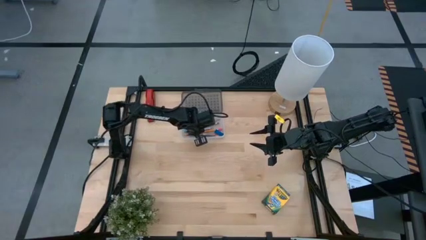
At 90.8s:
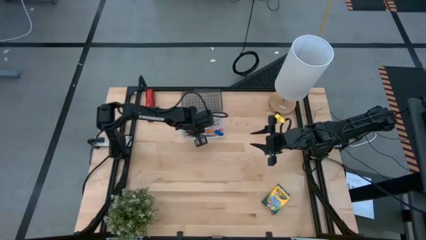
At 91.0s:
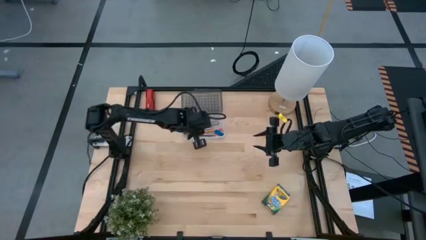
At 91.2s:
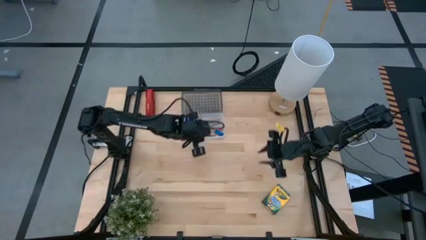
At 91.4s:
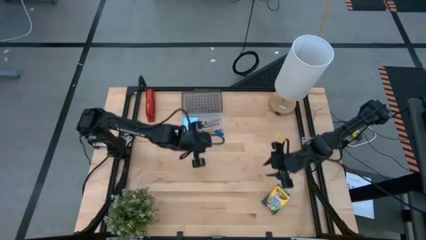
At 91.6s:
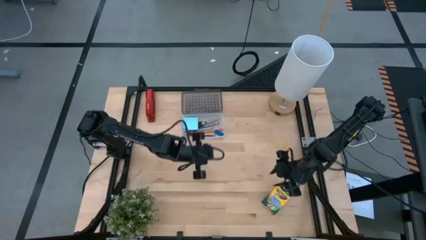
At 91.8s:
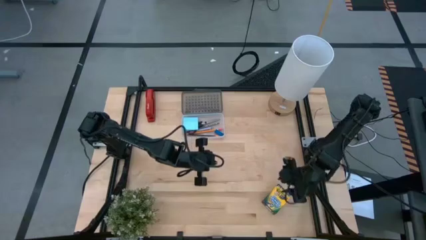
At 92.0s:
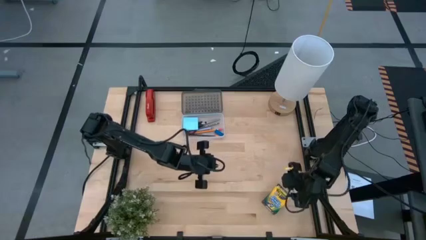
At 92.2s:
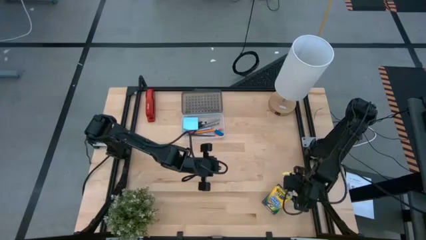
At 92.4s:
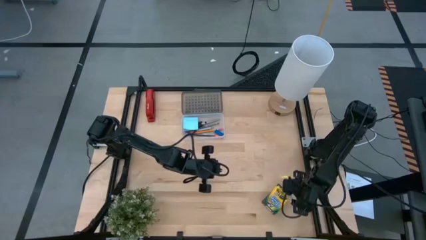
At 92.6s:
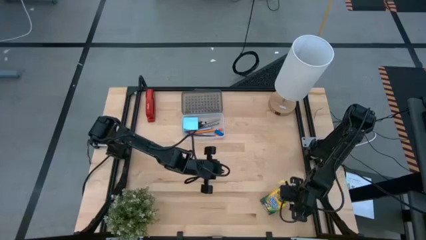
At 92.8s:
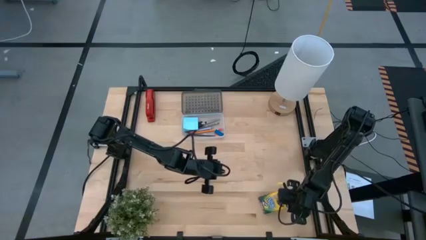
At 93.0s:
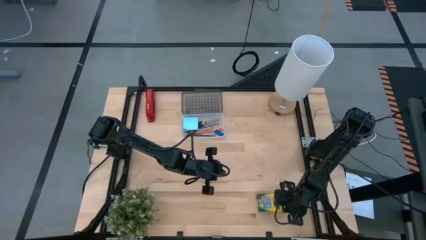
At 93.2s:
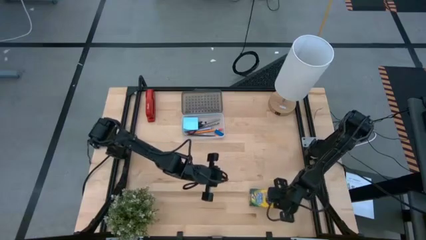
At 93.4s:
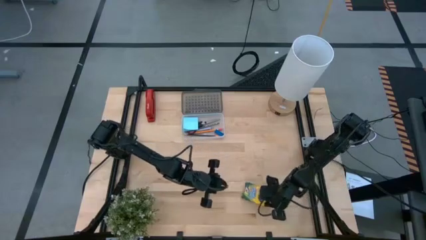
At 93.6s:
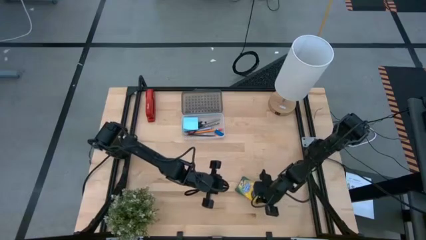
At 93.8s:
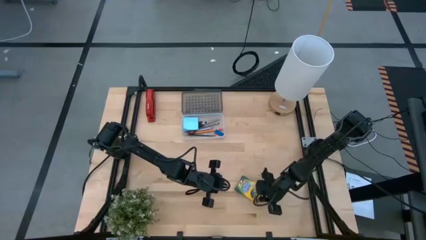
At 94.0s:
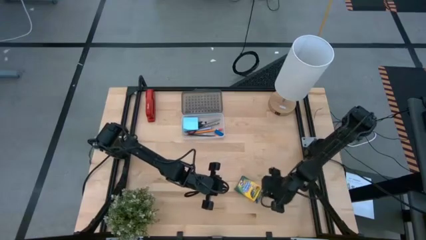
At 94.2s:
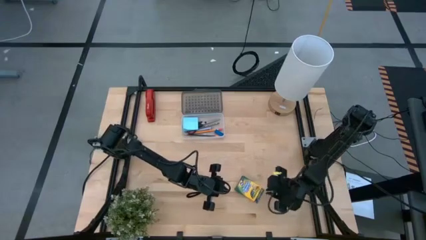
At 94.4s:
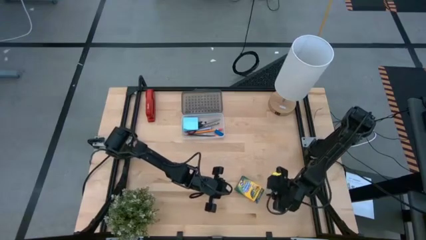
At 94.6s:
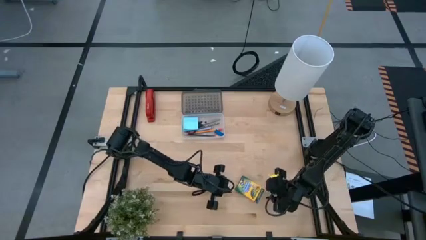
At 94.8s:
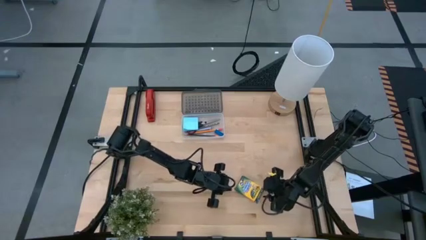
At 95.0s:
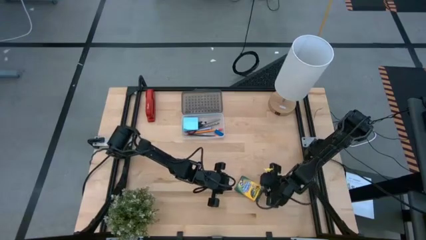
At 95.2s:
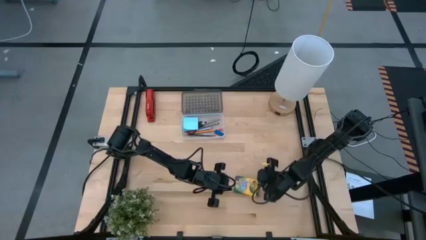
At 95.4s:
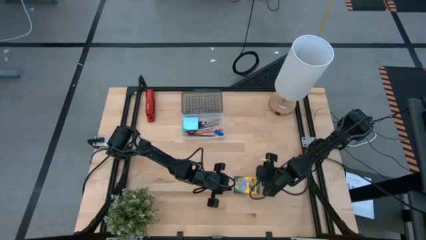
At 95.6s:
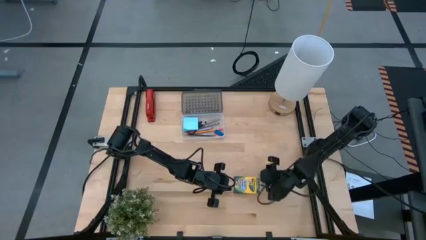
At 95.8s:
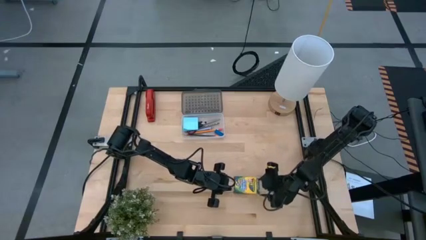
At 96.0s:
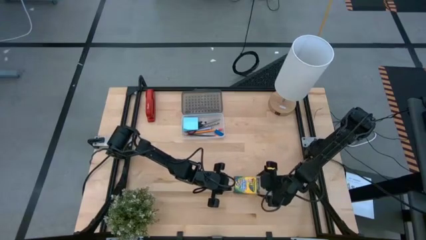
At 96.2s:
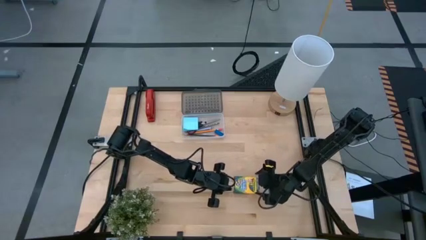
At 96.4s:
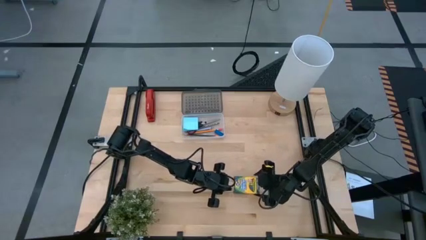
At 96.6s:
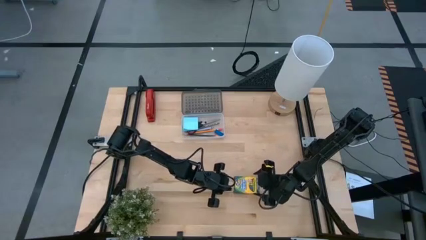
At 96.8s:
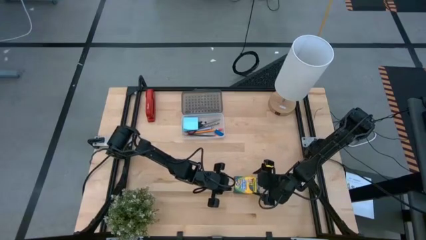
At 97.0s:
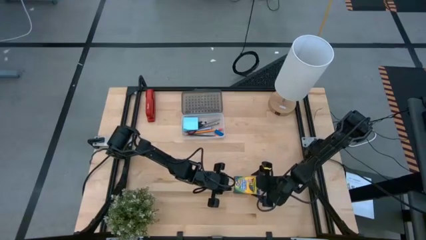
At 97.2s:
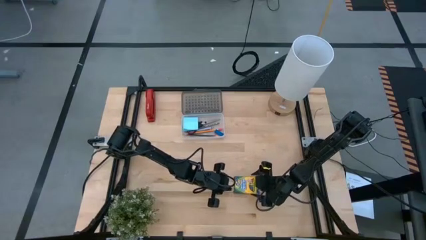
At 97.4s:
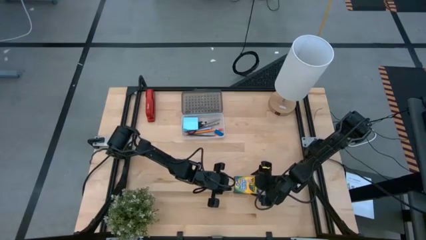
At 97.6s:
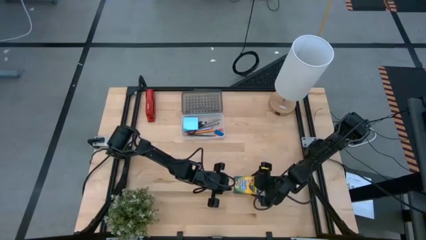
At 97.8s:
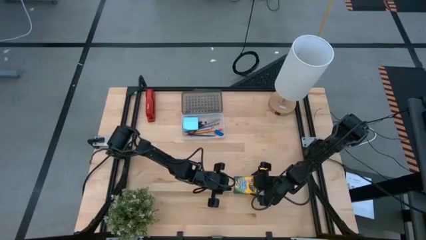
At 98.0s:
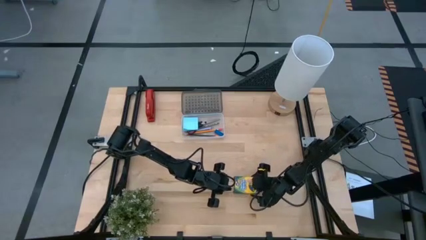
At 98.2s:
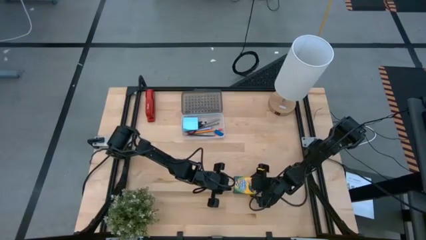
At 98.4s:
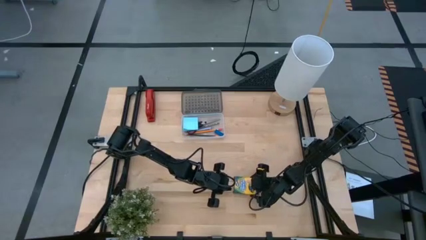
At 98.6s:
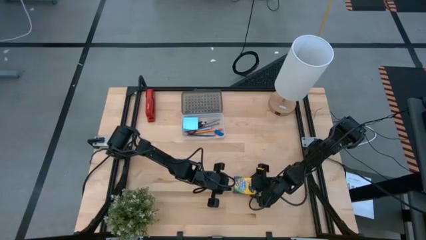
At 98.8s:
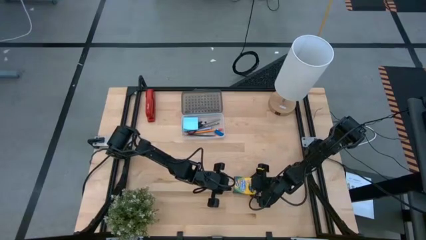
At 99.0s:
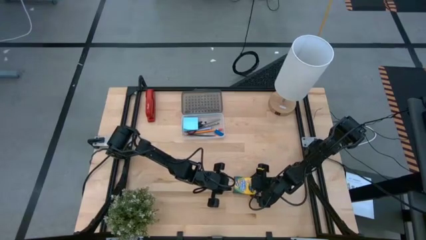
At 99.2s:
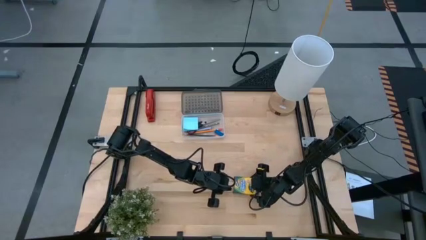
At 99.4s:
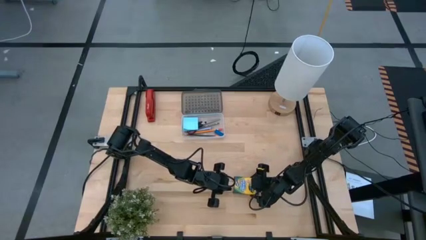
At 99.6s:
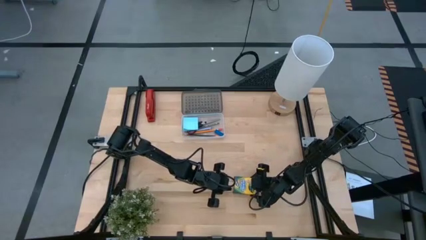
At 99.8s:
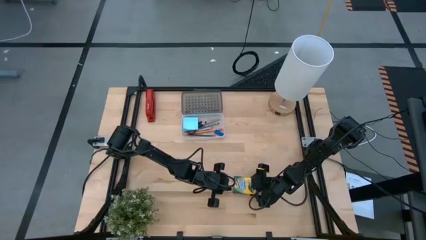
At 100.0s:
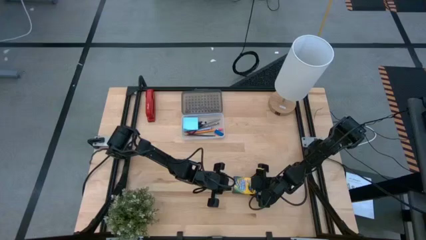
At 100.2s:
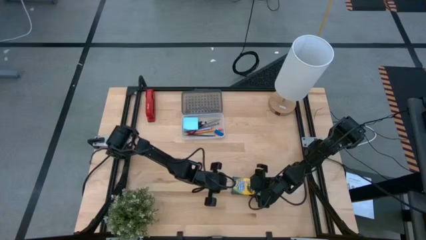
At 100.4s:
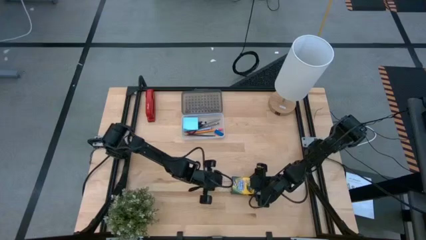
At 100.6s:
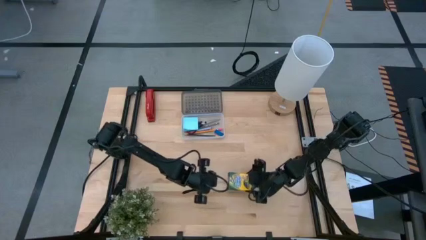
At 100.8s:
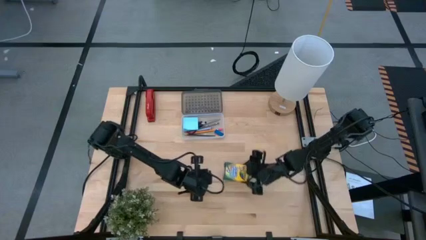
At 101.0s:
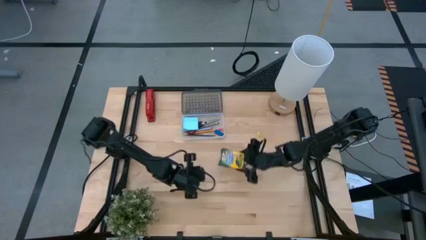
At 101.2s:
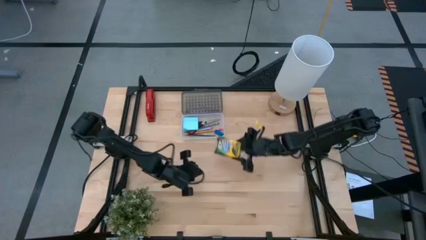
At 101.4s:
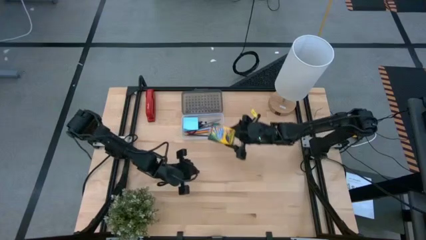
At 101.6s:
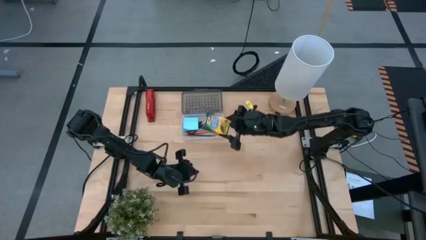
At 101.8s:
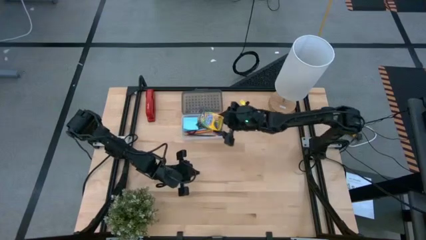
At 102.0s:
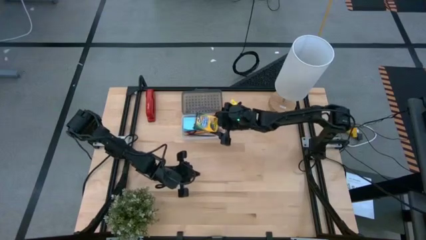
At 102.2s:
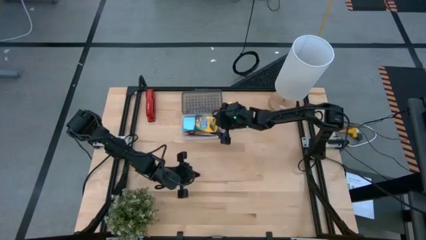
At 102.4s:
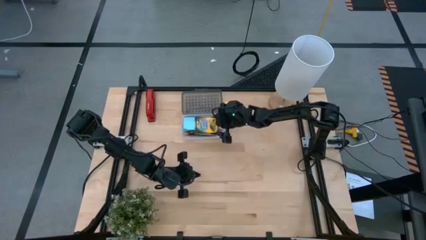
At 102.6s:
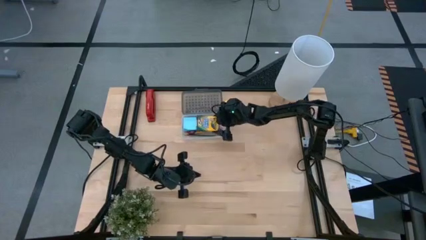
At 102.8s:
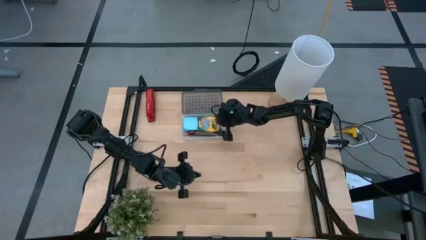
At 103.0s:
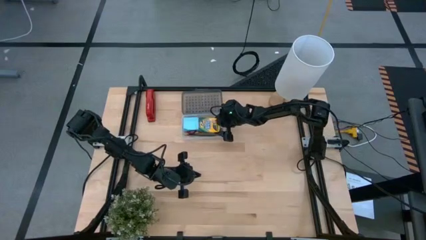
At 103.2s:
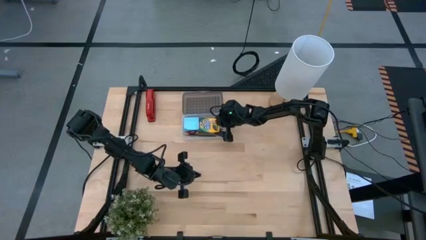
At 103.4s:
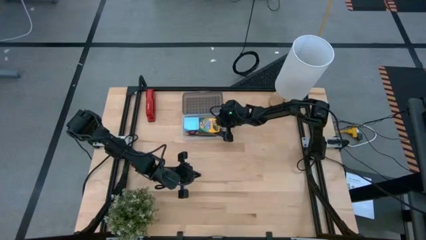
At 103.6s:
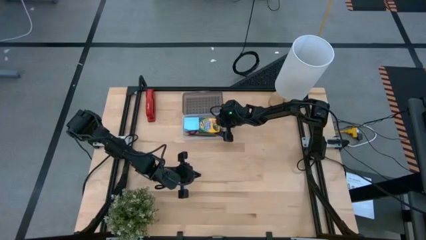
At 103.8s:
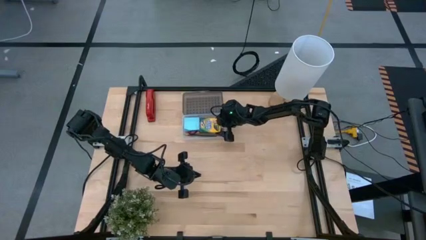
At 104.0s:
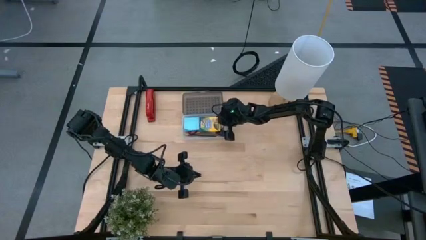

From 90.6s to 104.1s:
Task: Pack school essentials
Put the yellow crayon box into the black supply box

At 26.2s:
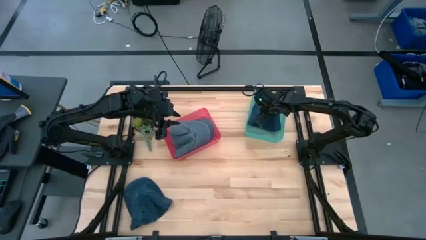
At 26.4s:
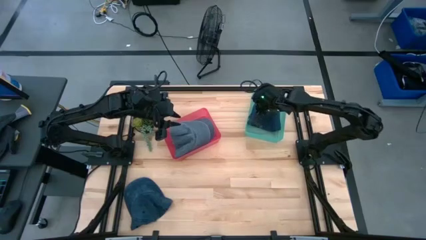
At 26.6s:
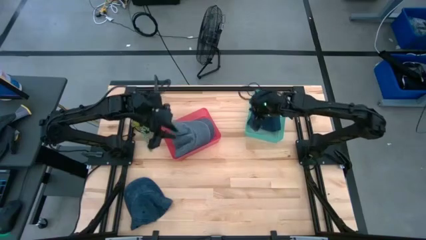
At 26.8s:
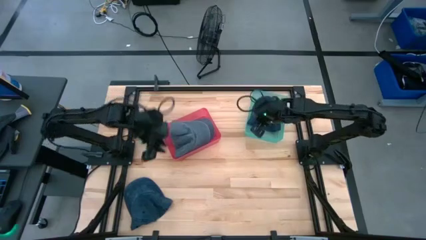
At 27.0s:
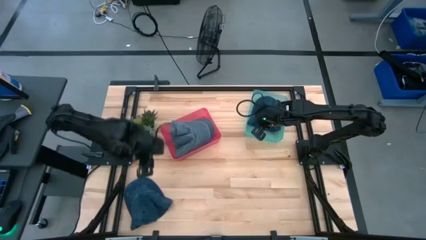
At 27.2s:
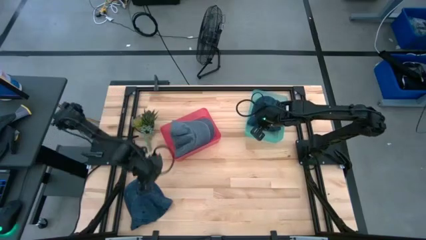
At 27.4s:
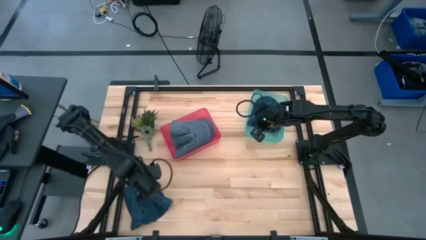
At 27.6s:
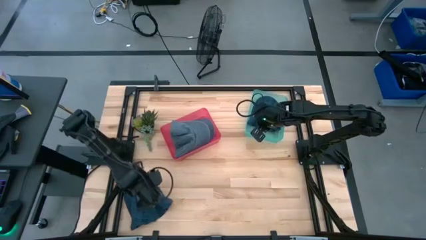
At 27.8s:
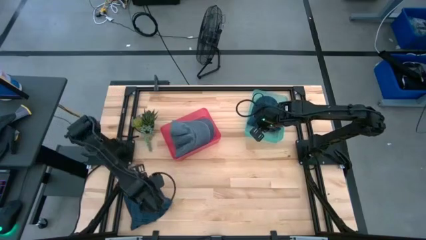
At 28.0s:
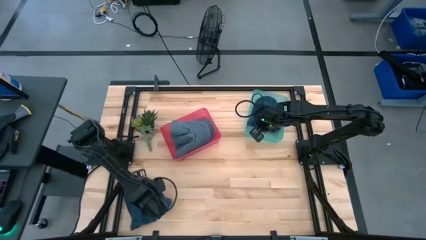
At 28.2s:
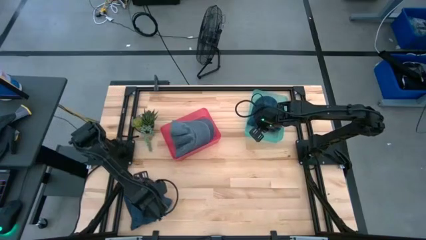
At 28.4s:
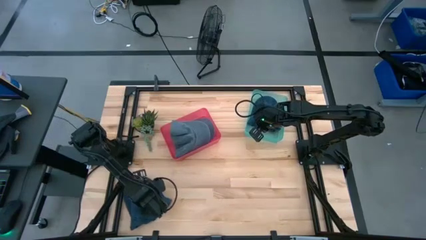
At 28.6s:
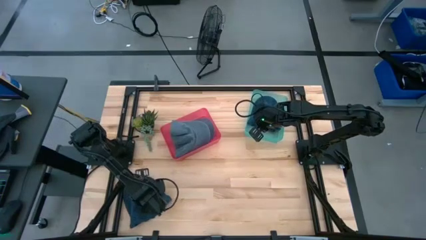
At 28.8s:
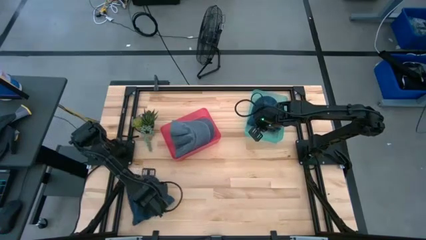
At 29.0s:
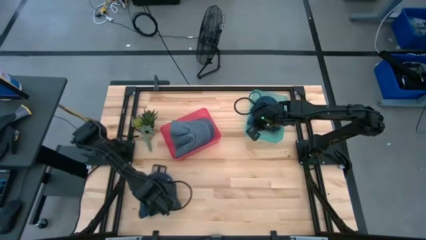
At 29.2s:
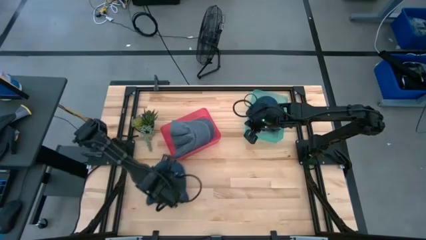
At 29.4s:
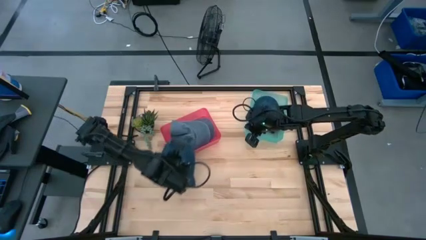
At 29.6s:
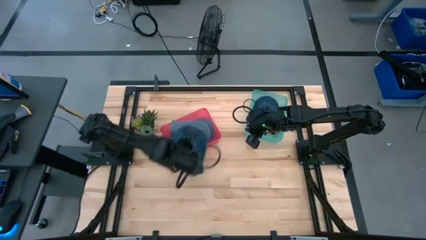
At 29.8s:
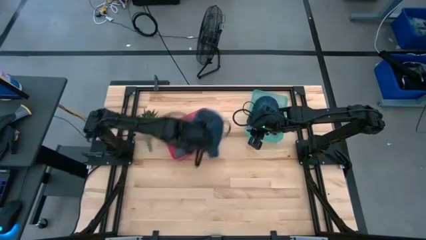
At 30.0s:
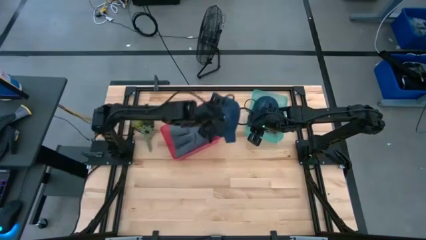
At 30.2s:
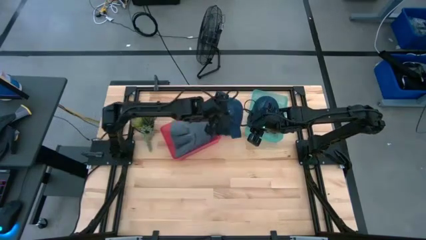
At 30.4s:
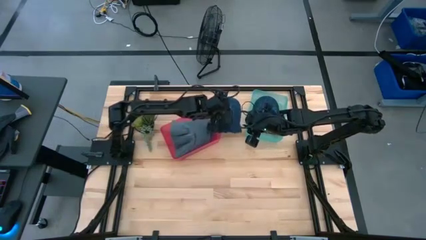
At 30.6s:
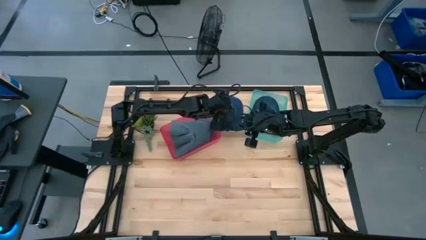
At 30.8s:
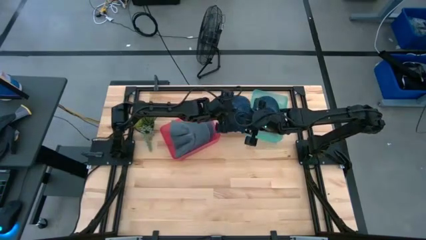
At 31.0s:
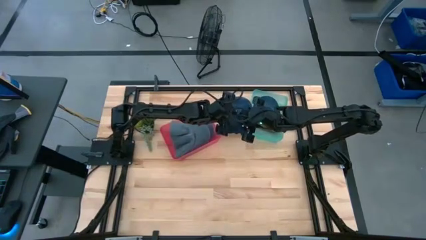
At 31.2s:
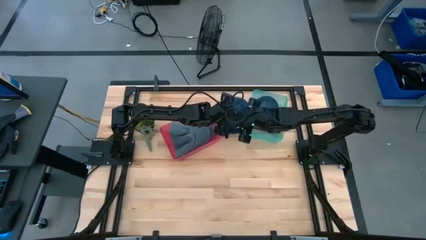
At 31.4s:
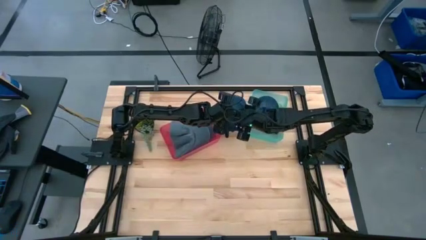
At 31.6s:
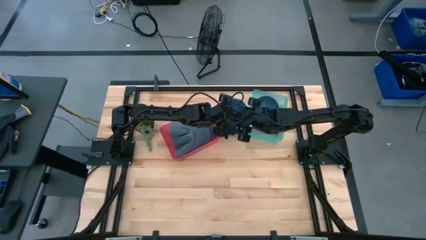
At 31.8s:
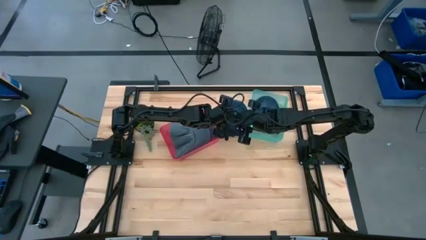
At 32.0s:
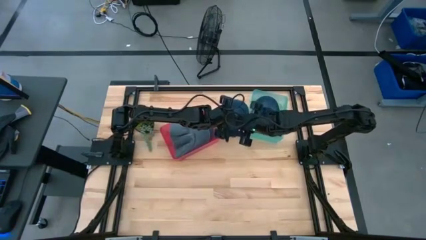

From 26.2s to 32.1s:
Task: Pick & Place hat
Put the blue cap into the green bin
